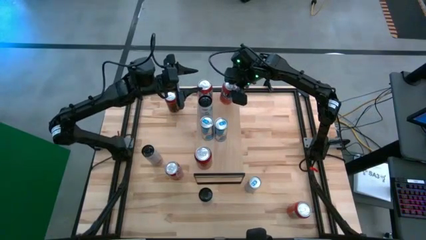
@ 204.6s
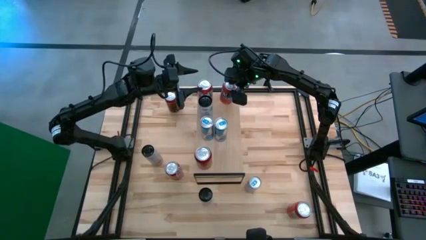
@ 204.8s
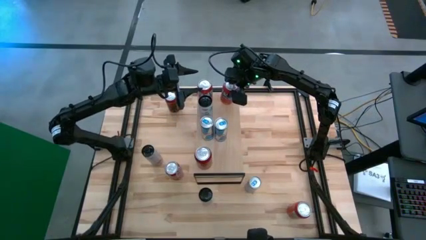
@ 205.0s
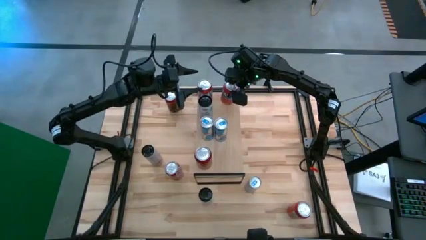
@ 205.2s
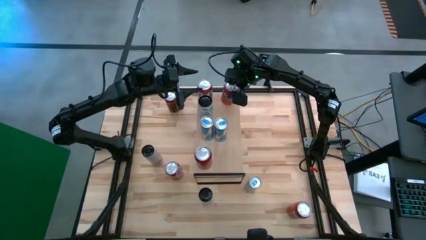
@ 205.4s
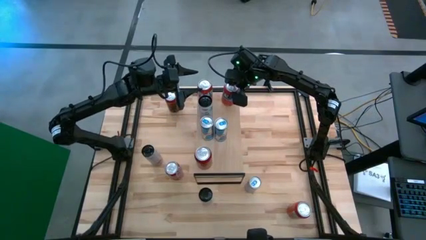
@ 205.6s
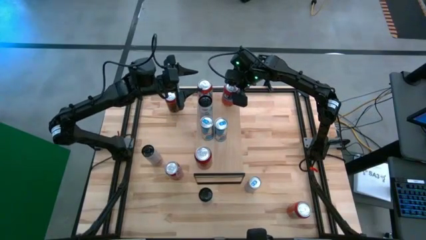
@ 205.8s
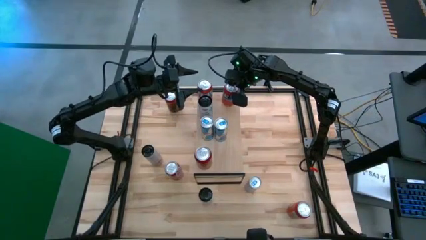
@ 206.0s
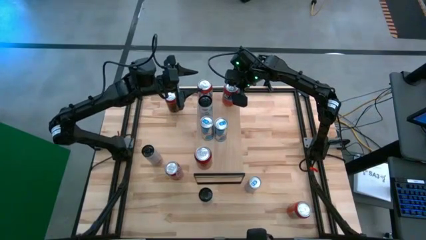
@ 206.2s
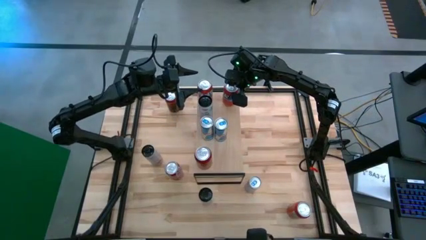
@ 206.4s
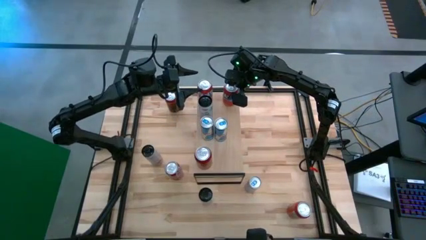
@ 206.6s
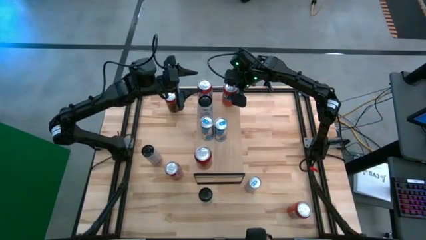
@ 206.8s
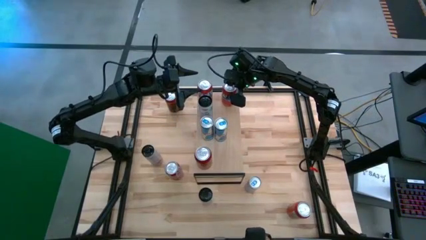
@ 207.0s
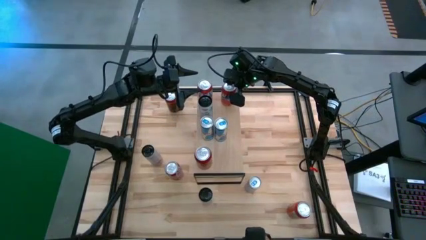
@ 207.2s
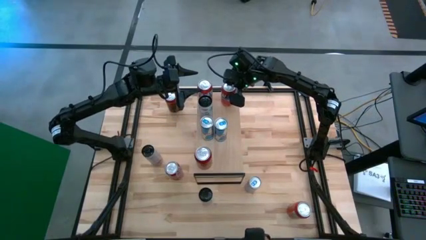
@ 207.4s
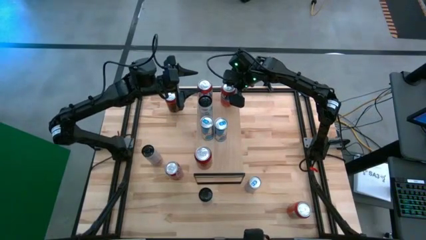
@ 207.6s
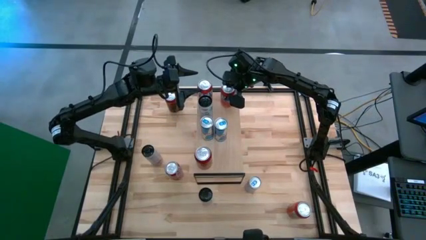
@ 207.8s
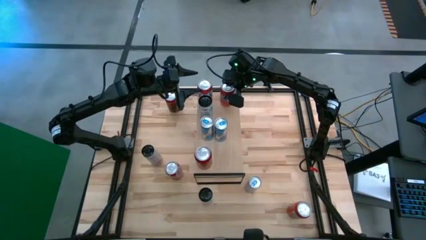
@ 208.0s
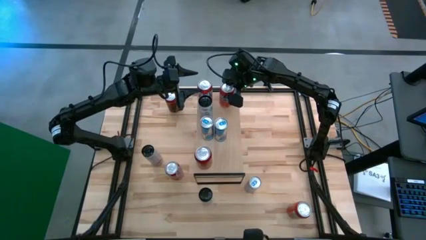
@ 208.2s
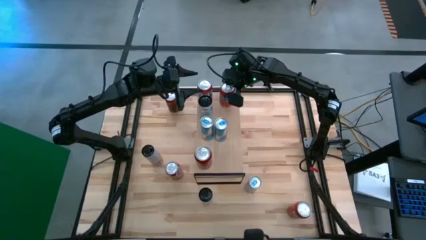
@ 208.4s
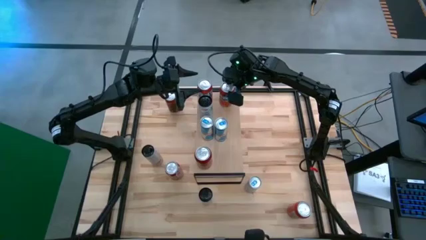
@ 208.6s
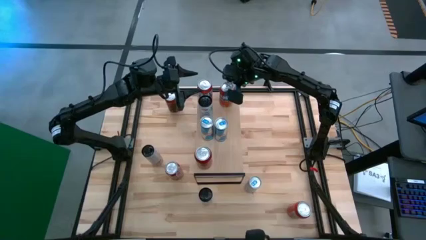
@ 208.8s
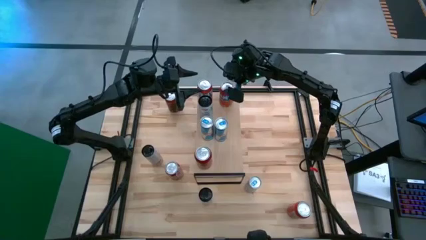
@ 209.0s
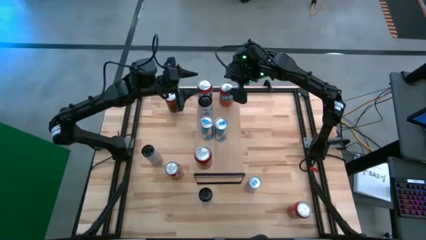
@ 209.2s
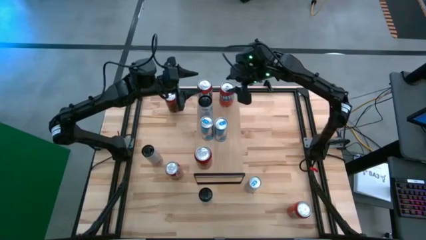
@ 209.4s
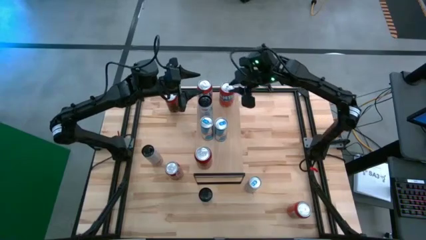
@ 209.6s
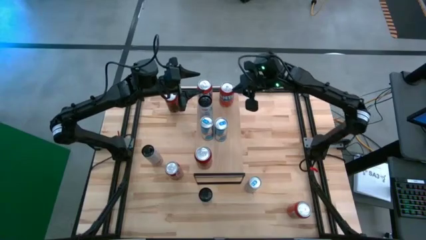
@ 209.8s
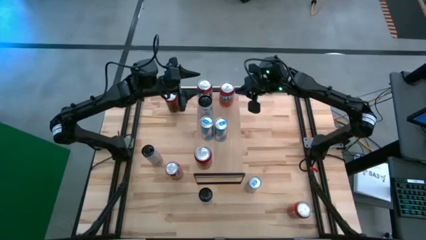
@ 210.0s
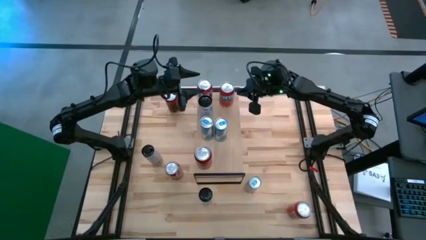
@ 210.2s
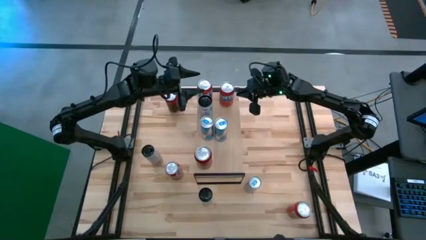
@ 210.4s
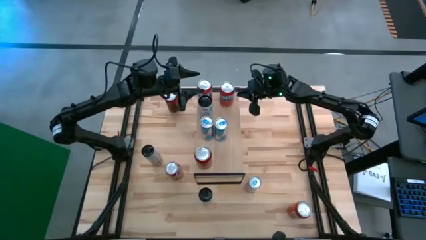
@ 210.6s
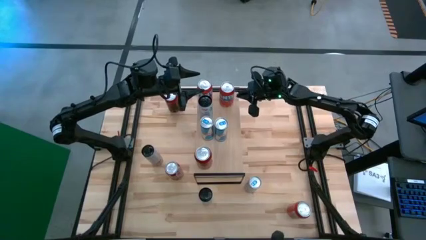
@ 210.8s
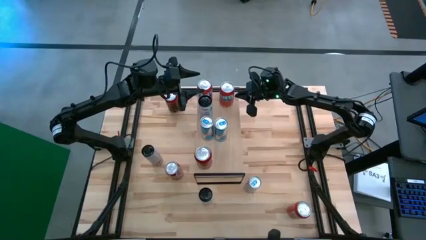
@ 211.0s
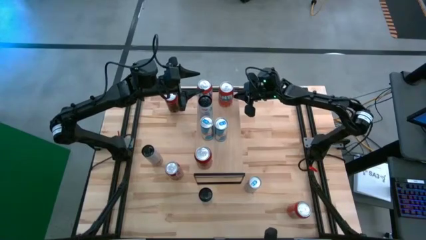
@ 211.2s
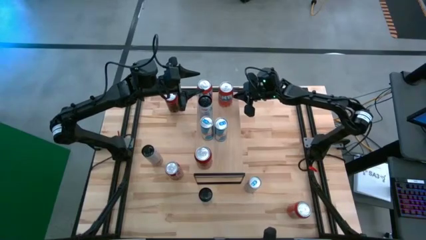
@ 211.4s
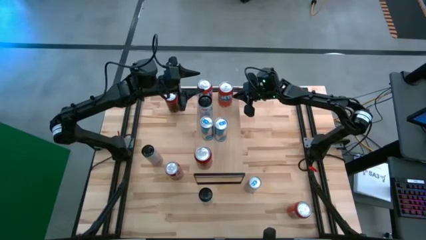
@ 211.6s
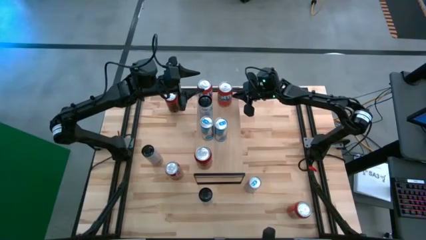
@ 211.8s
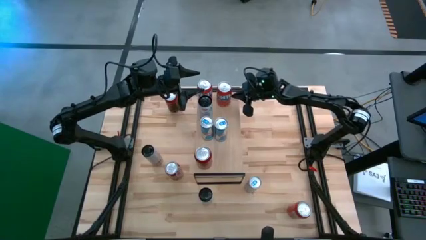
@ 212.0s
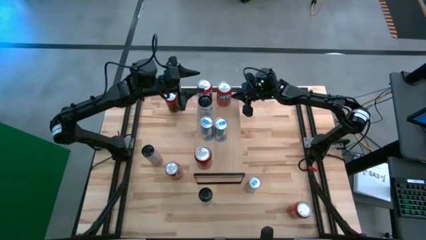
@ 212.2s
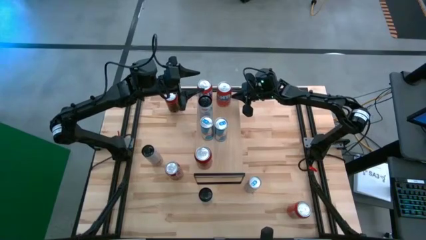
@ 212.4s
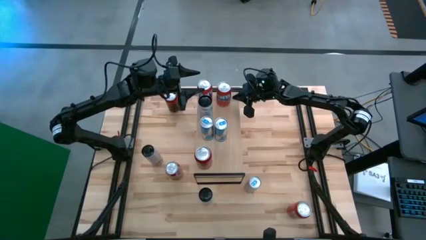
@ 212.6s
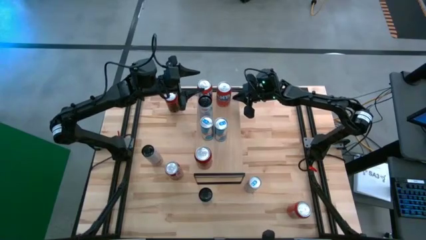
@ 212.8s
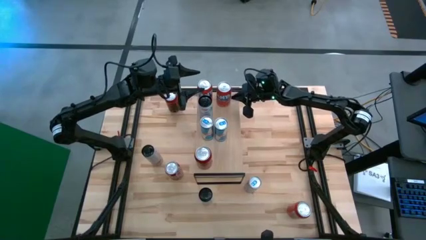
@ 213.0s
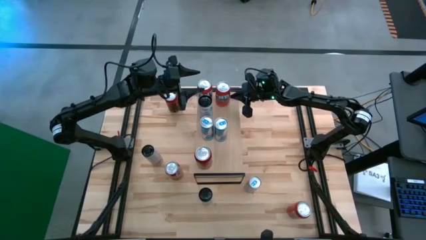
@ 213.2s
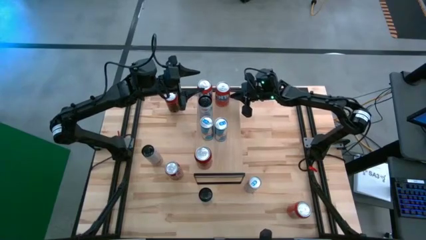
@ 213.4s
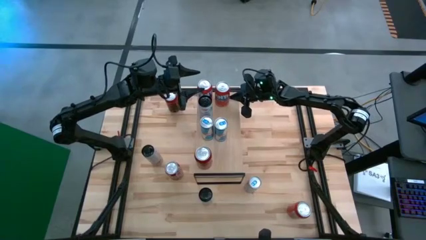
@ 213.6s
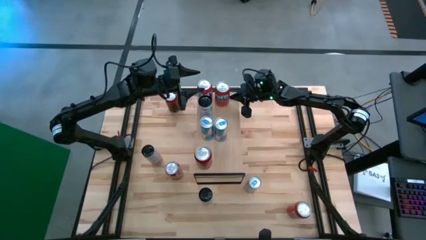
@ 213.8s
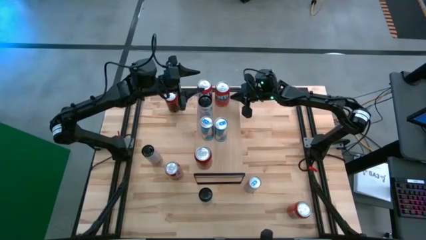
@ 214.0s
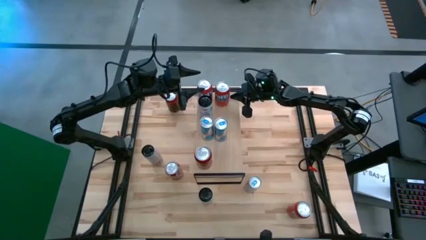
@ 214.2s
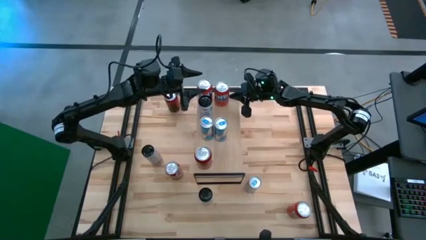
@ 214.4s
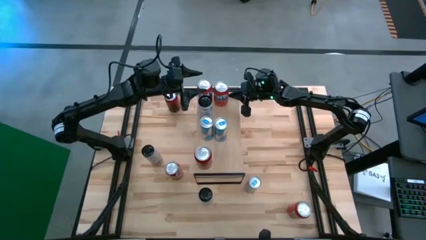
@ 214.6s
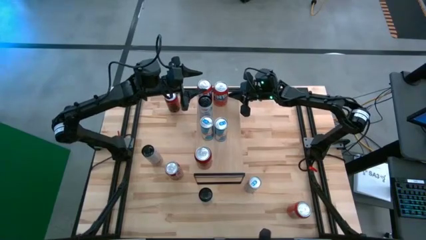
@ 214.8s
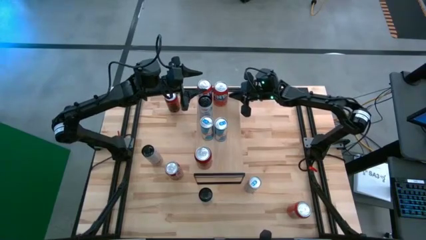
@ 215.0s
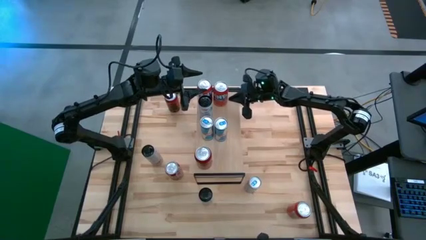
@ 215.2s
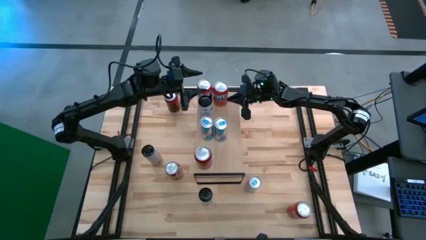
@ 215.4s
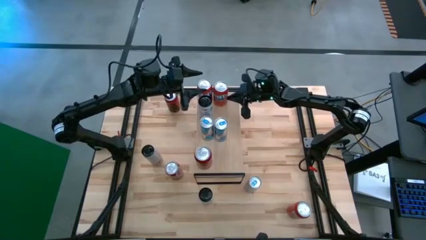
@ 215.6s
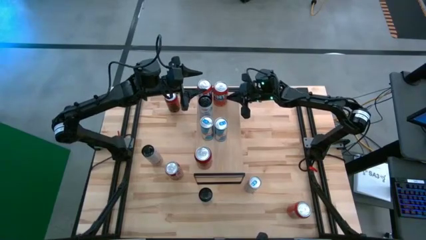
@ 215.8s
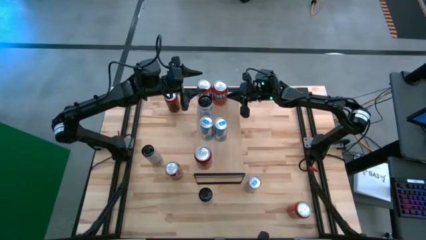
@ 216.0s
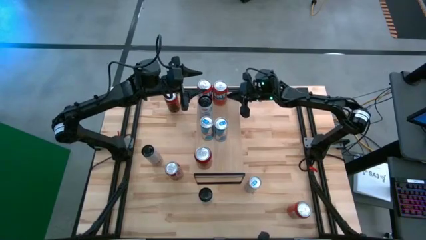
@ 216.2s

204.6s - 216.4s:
Task: Place canned beverage on shelf
Put the orange soda can on the shelf aligned with the other orange soda can
